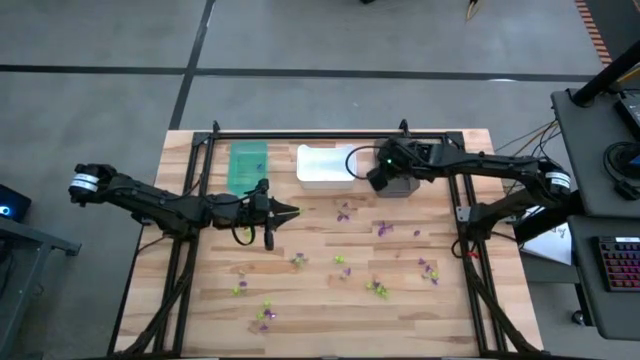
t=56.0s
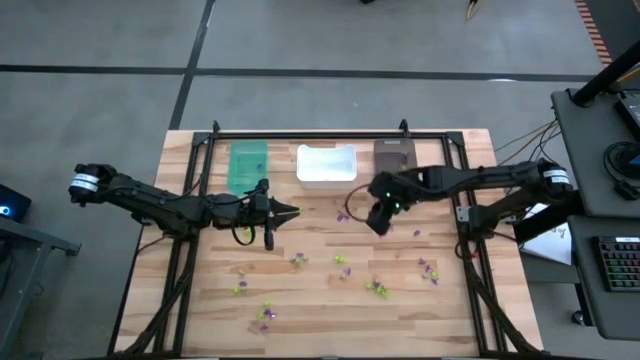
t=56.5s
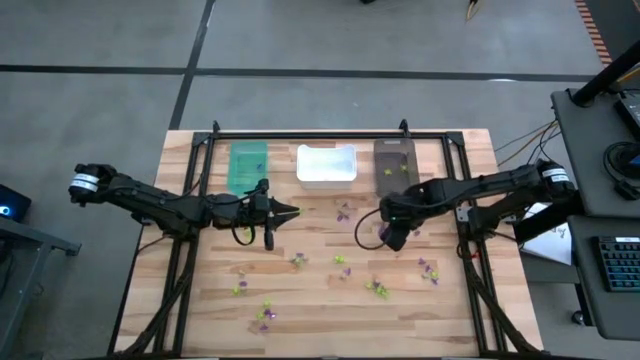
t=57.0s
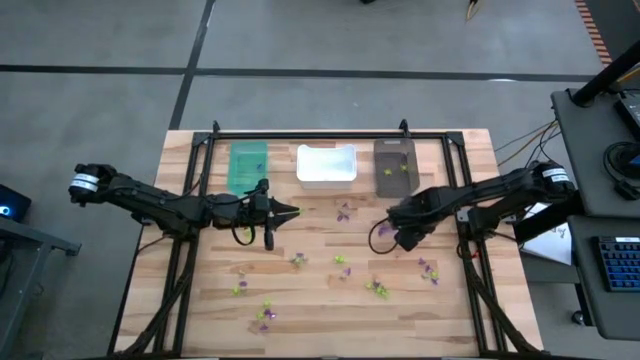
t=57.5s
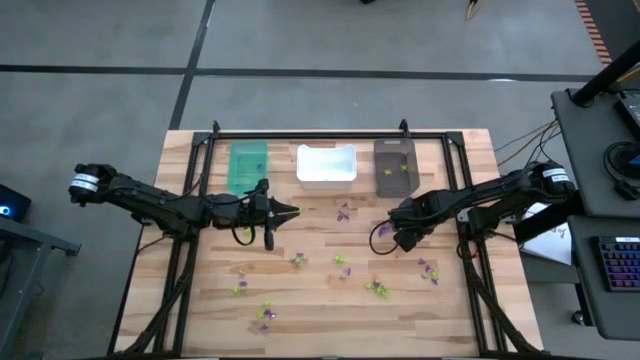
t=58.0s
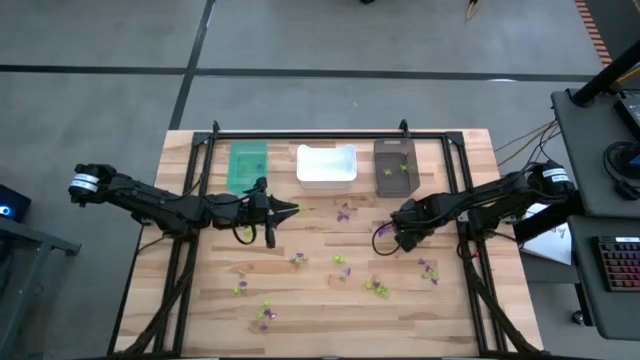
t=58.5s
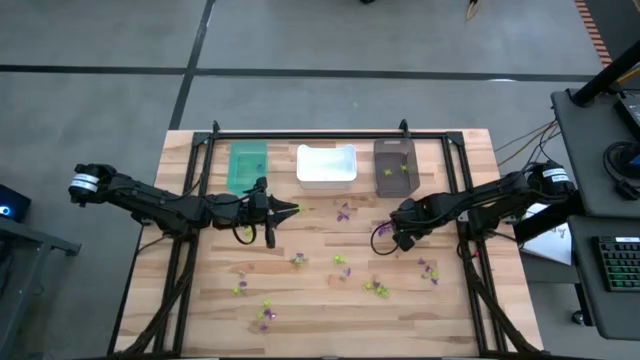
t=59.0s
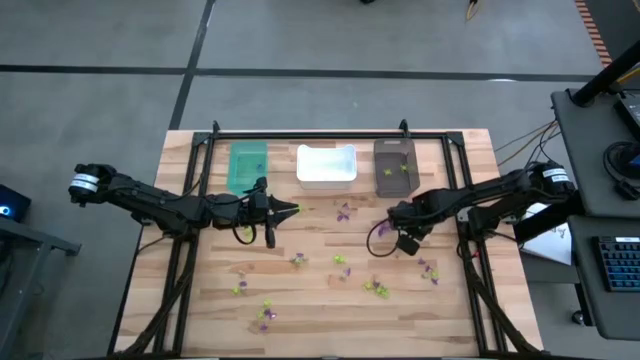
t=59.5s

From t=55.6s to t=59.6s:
Task: Sort Halloween decoration
Put the purple witch hat toy into the light blue bin

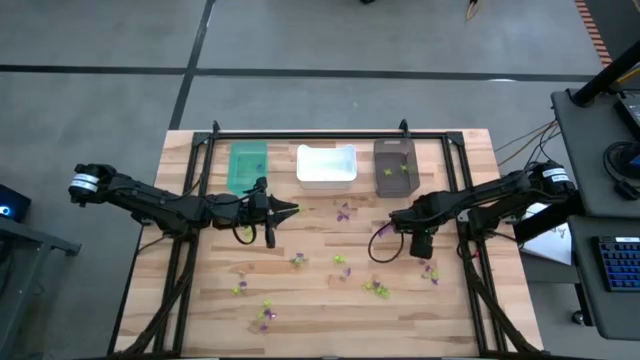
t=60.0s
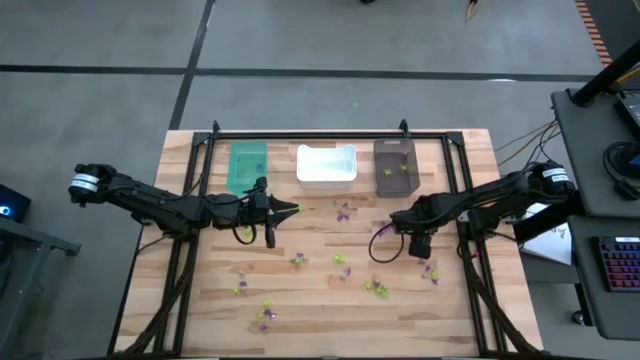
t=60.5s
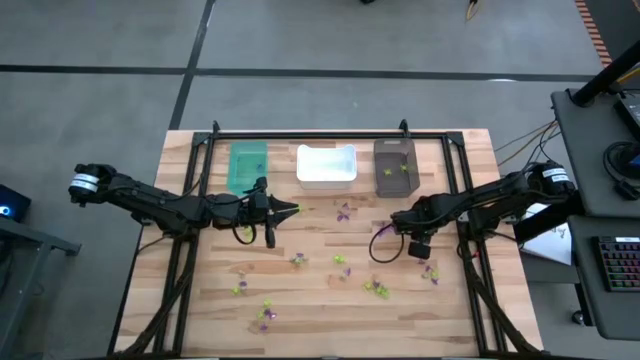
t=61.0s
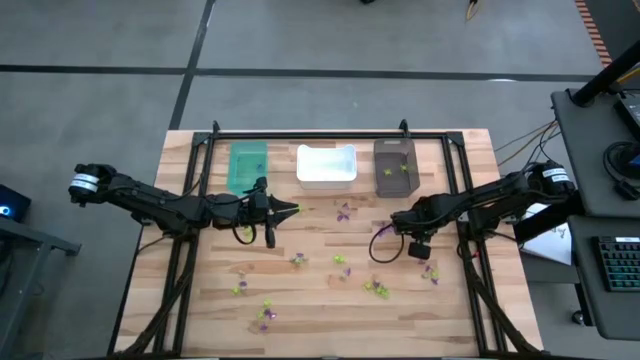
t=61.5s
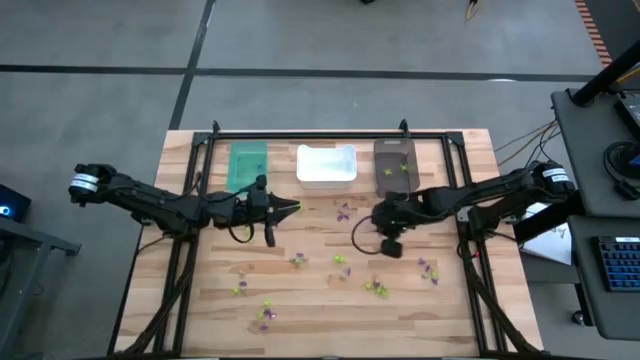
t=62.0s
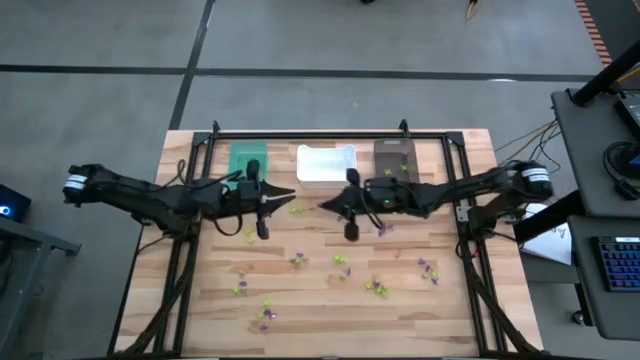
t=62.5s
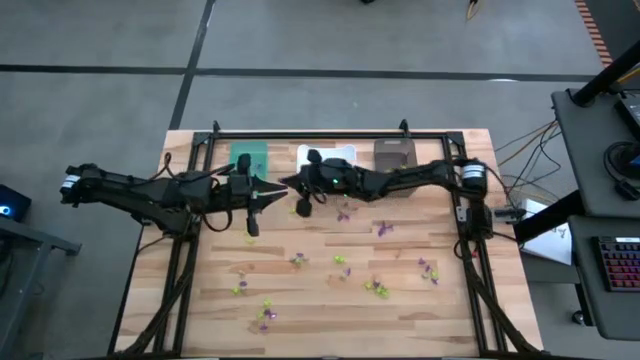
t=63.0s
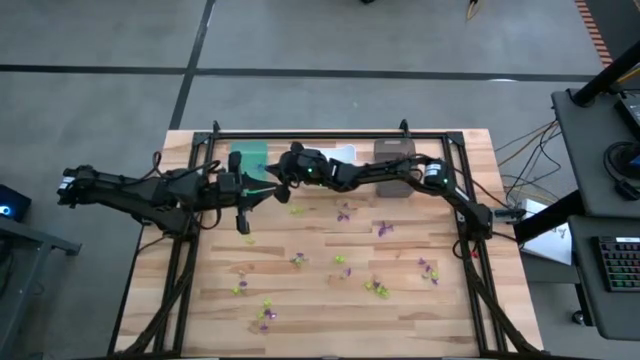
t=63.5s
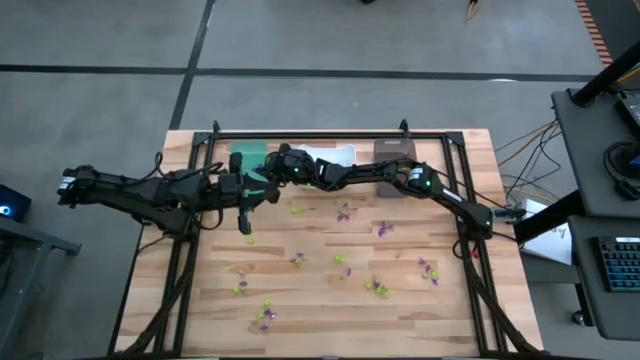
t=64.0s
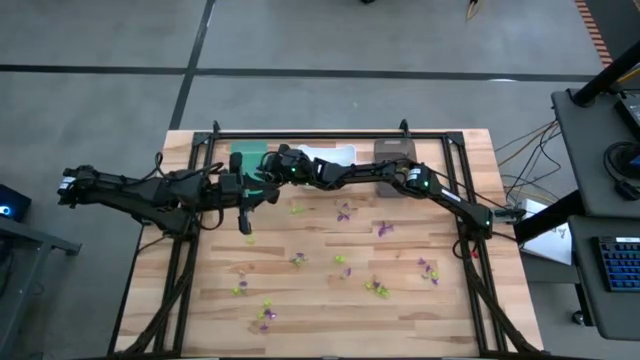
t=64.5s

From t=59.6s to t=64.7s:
Put the purple witch hat toy into the light blue bin

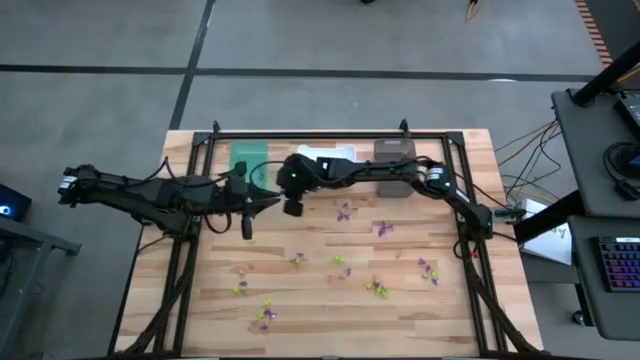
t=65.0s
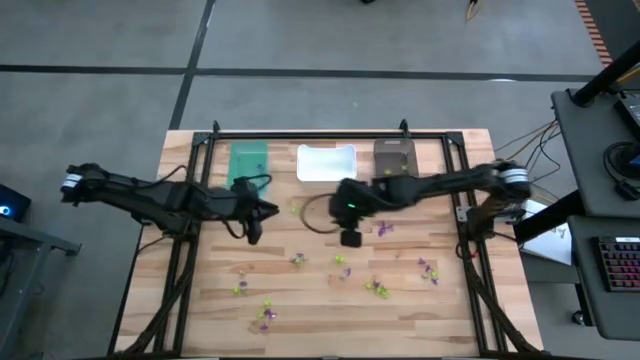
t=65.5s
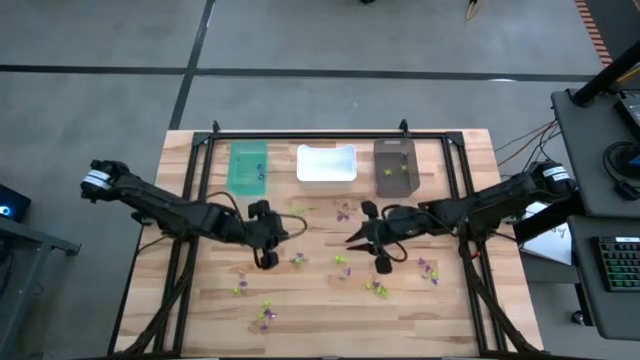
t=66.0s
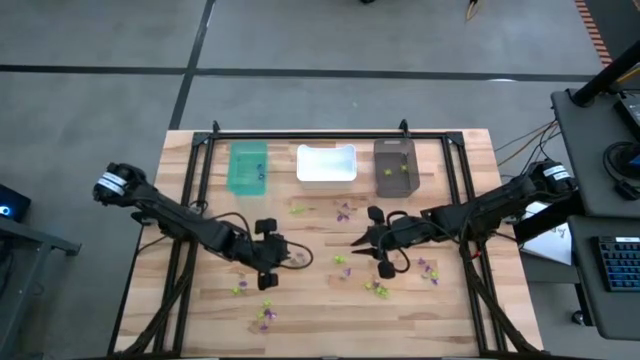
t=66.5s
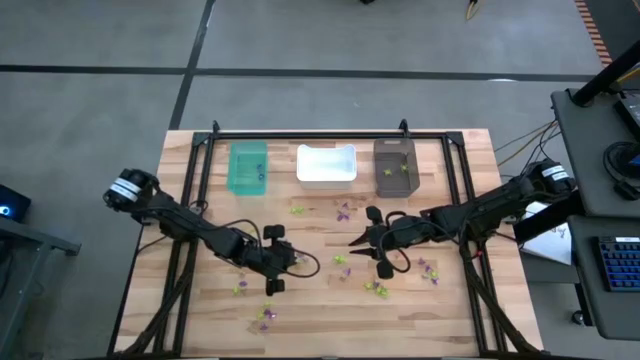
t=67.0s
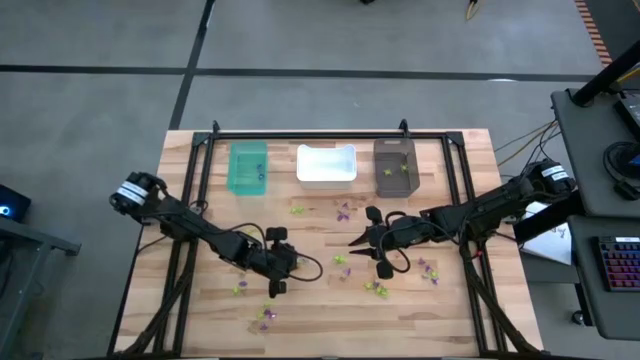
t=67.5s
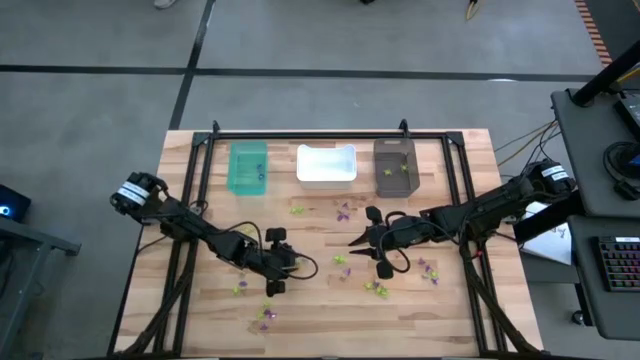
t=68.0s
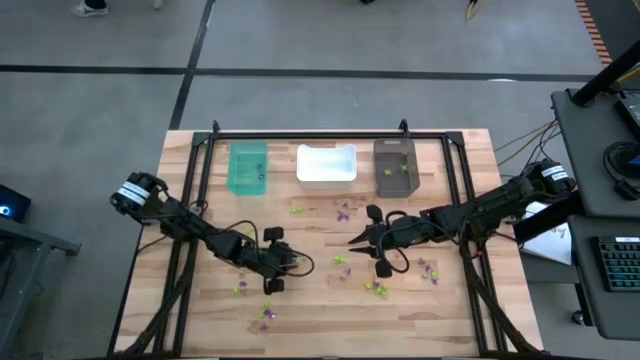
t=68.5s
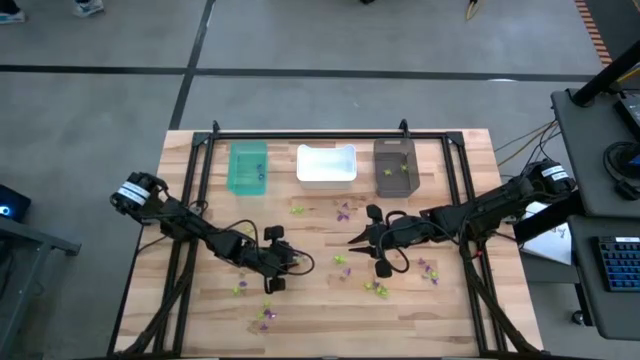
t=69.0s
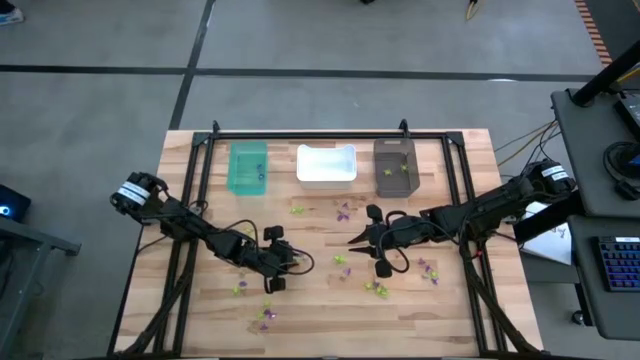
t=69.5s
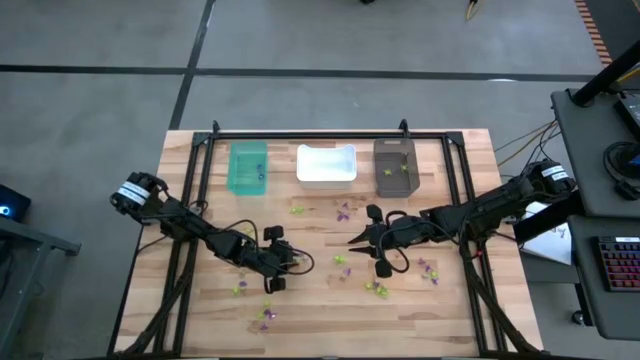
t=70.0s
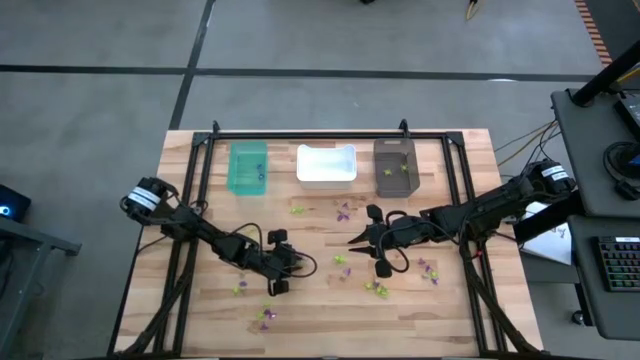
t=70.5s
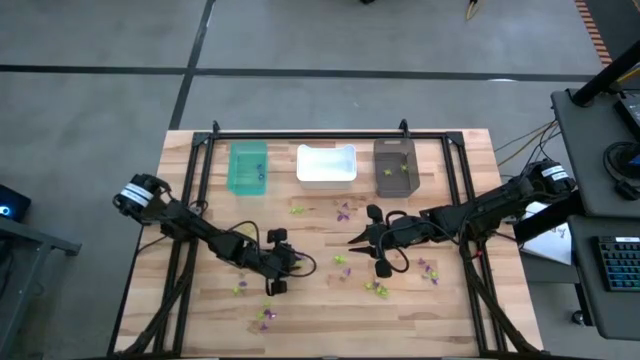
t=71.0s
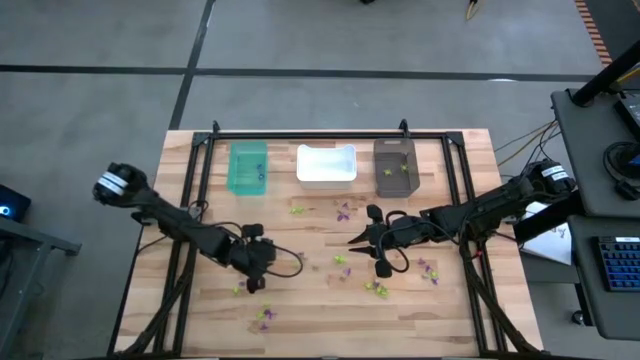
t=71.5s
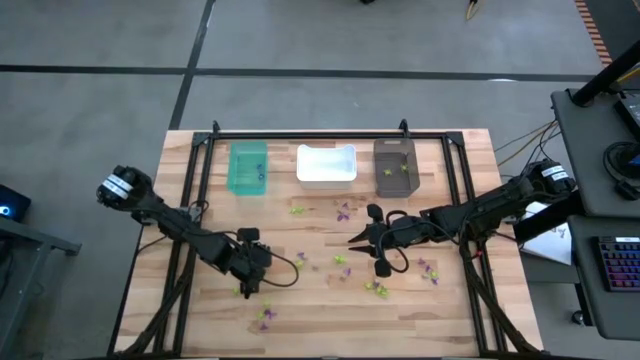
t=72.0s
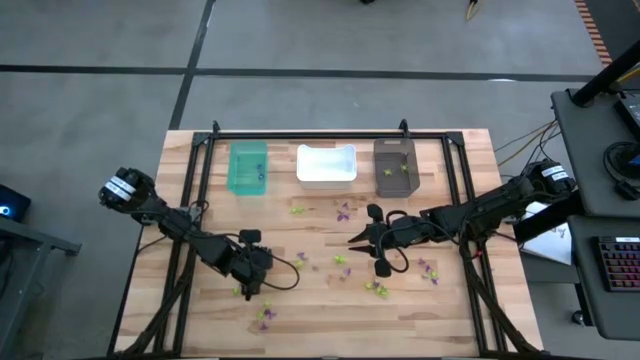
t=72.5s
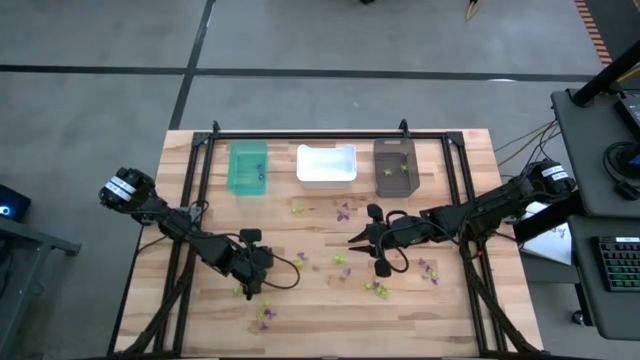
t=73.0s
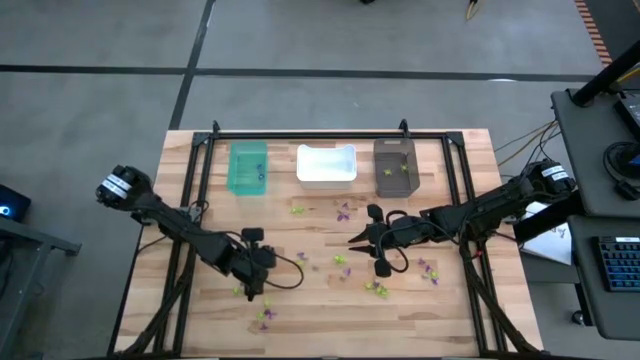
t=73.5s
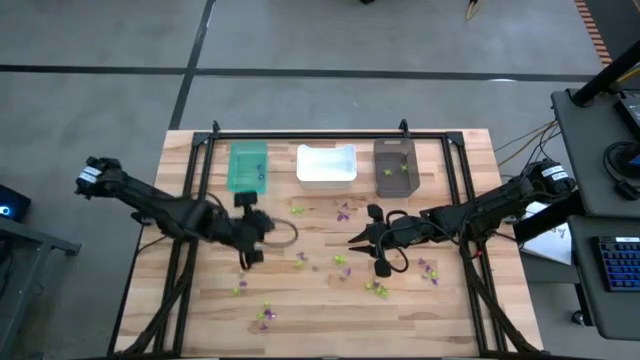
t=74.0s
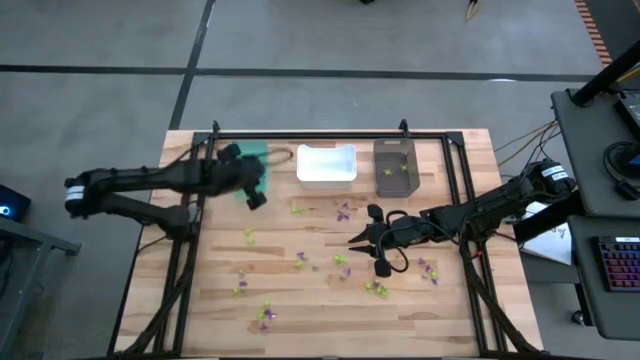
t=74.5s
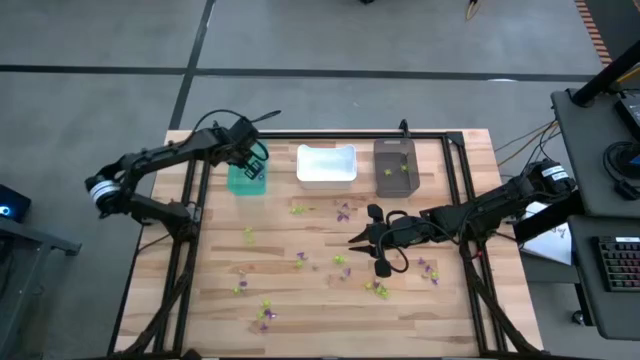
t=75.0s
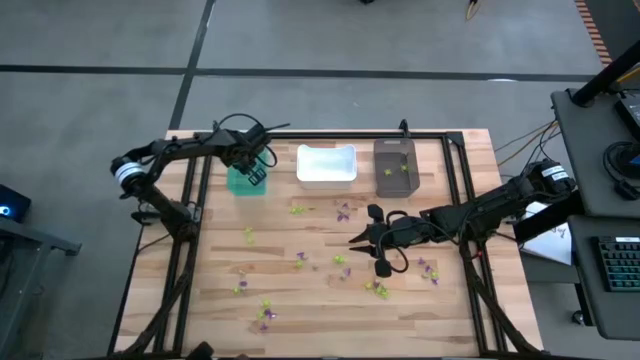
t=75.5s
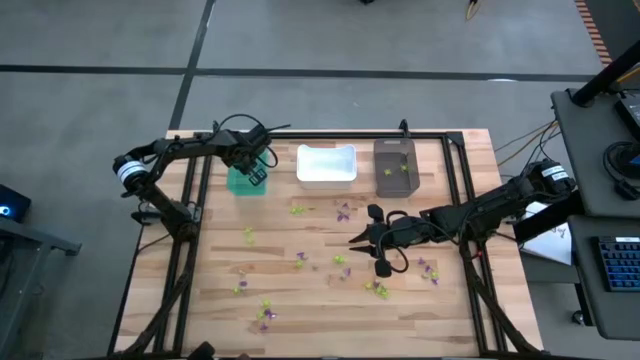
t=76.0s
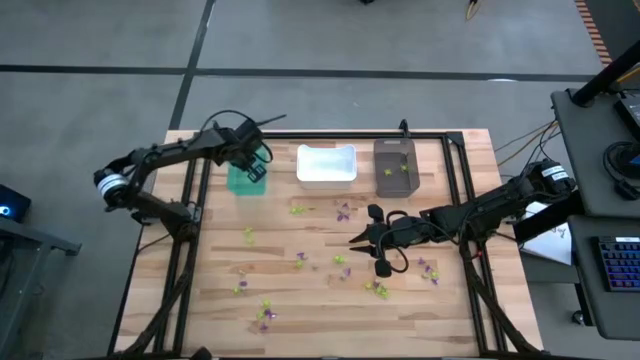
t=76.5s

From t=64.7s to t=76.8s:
Put the white skull toy into the white bin

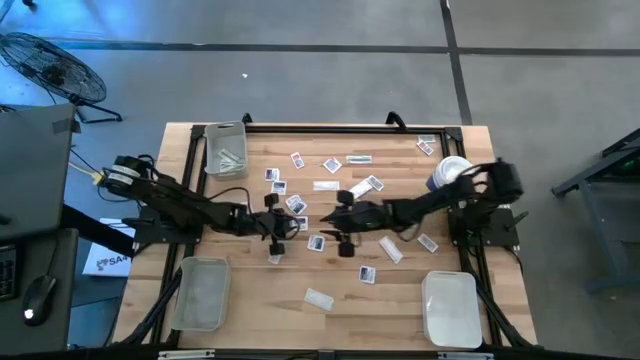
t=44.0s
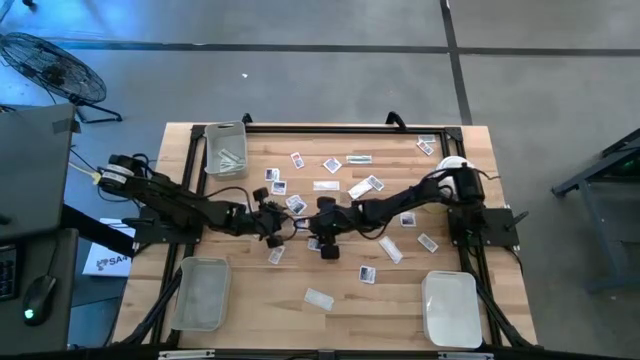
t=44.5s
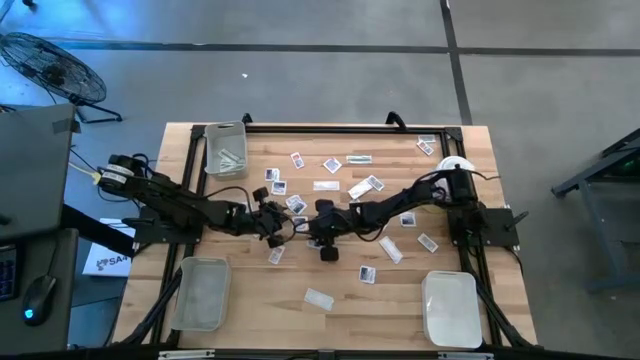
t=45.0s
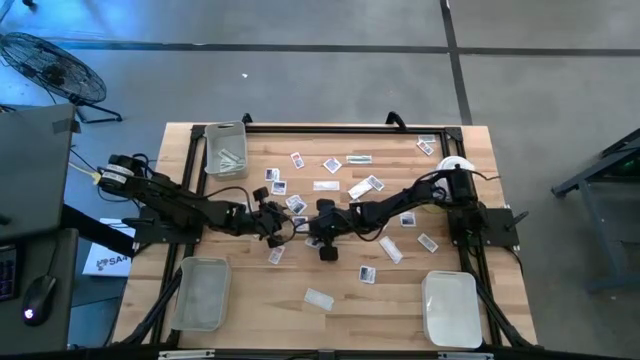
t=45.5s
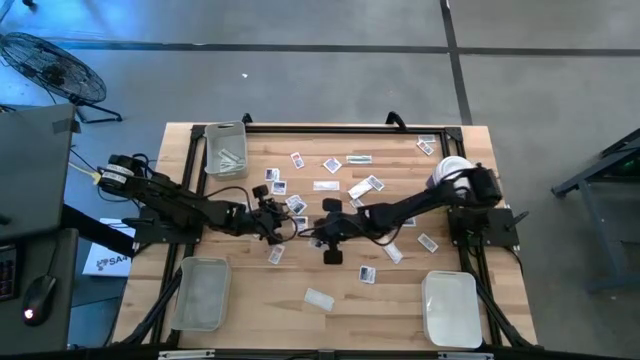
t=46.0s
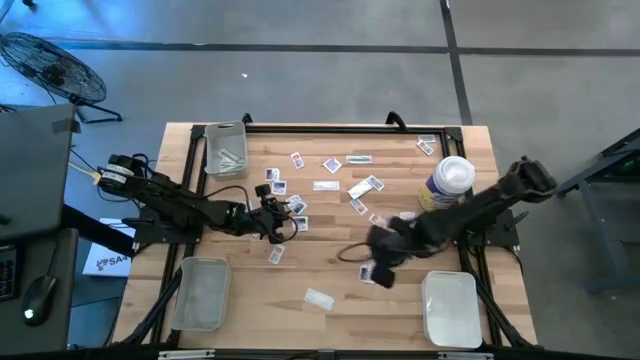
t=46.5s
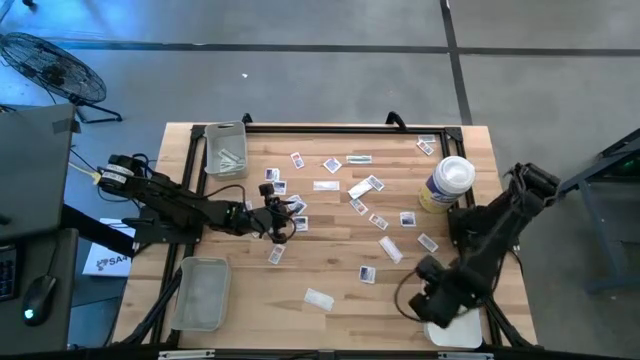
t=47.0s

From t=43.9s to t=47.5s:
Task: Pick & Place First Aid Supplies
Put the blue alcohol pad into the white bin
